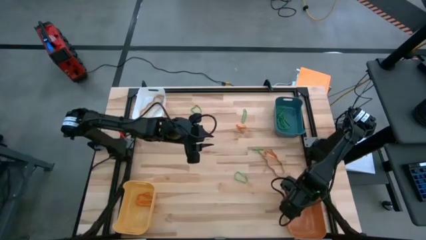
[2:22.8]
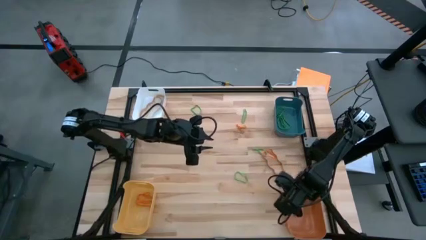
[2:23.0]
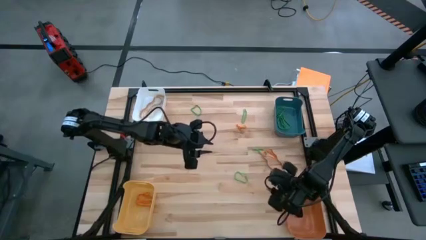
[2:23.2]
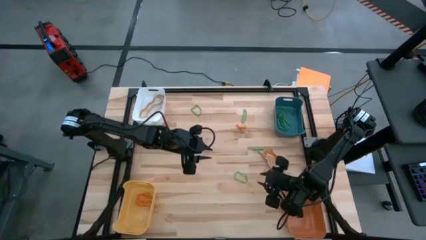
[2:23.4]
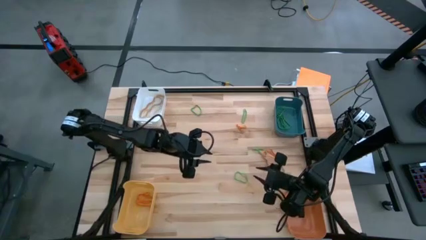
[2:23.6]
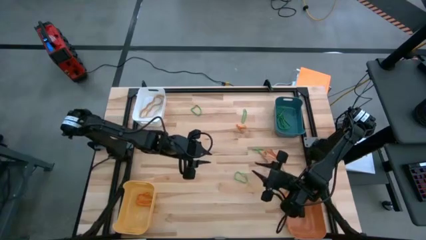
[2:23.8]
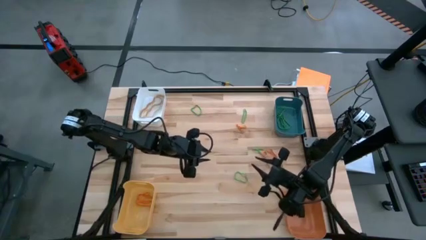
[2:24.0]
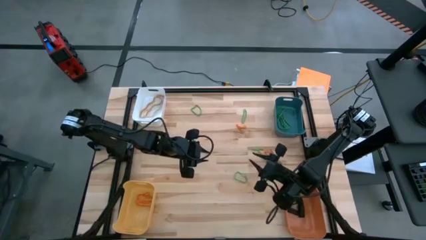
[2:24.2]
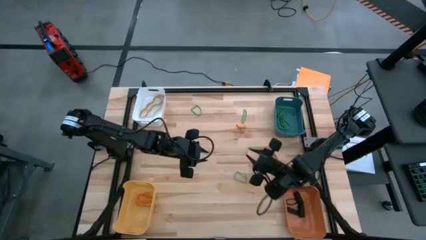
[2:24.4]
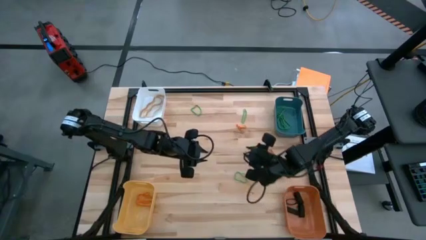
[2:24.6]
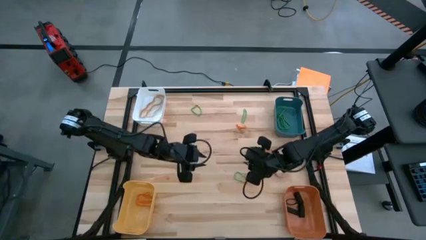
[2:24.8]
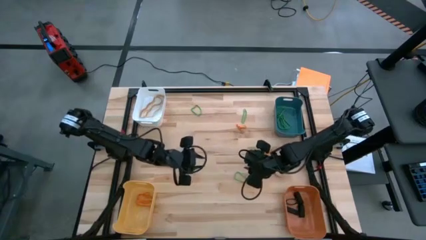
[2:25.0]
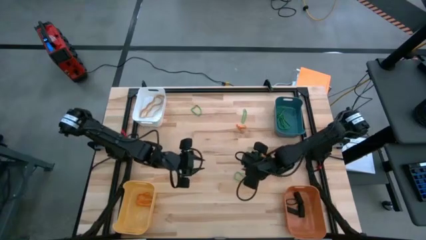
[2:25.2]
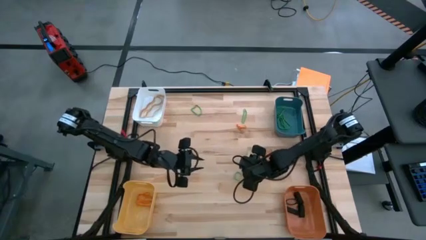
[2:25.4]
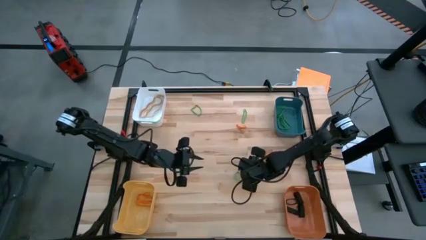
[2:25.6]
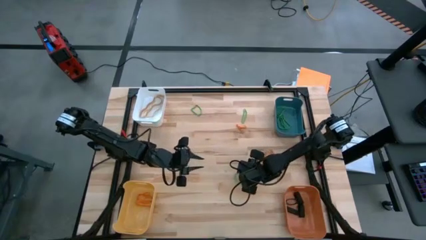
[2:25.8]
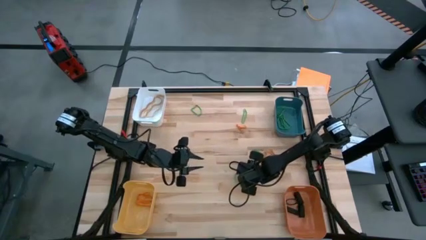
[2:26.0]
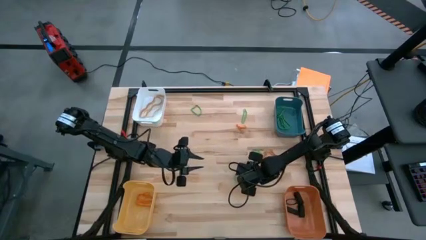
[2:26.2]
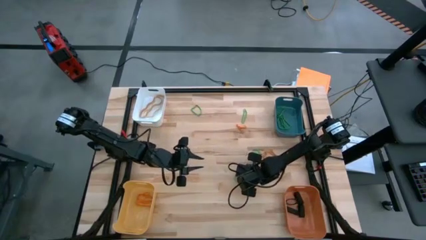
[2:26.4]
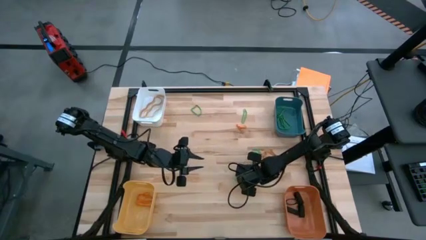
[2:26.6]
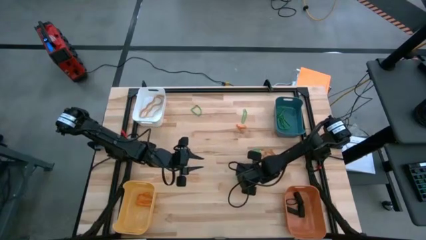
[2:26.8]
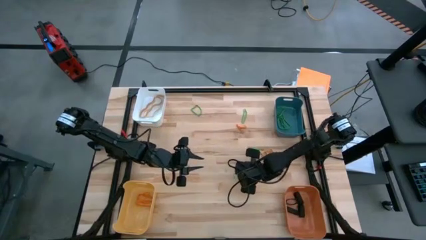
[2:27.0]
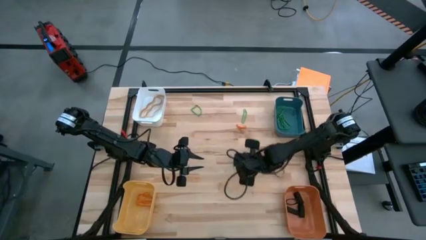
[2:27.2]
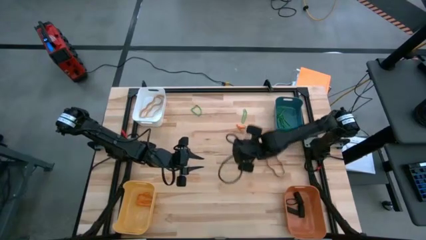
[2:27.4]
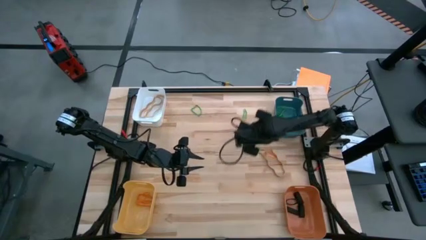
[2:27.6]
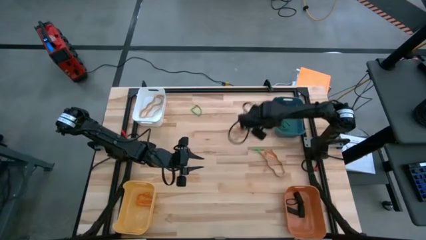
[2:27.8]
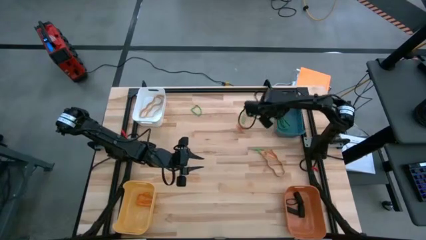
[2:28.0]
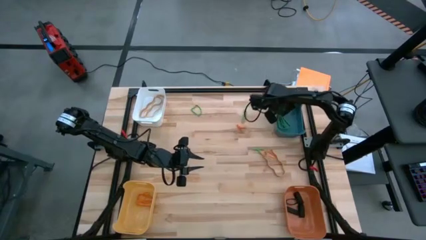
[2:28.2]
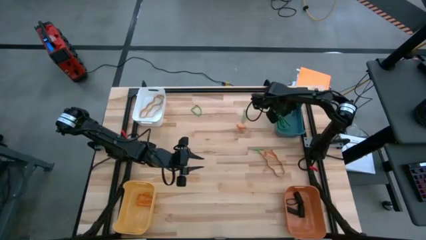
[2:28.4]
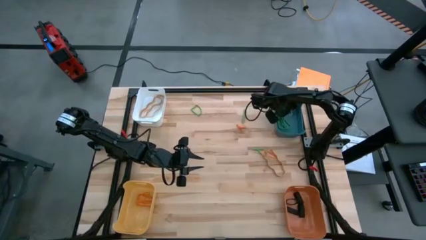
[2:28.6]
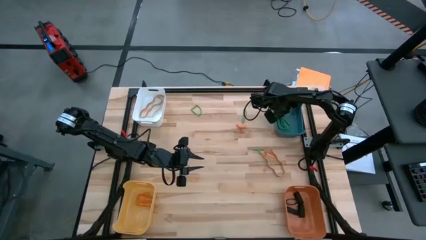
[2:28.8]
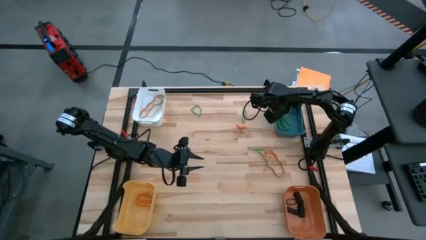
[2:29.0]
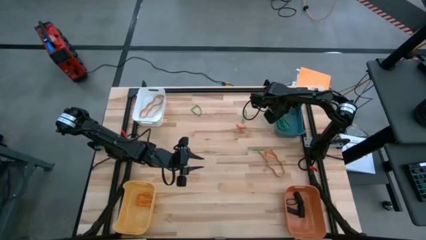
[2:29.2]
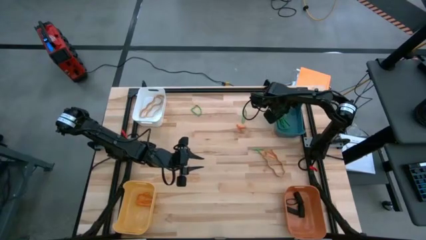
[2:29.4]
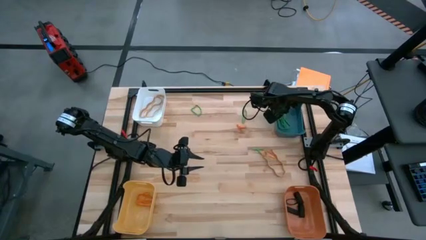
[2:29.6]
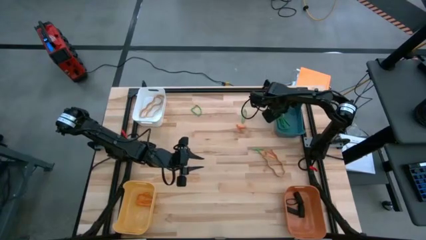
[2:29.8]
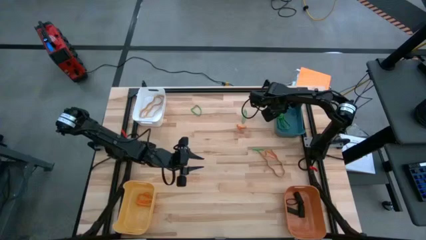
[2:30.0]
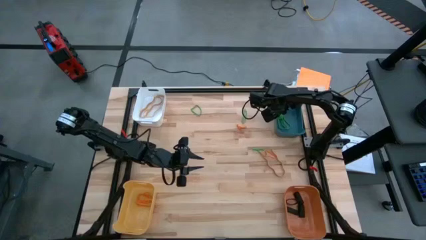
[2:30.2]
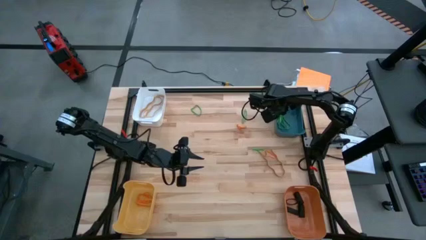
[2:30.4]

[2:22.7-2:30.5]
Task: Sort rubber bands into baskets
Put the green rubber band into the blue bin

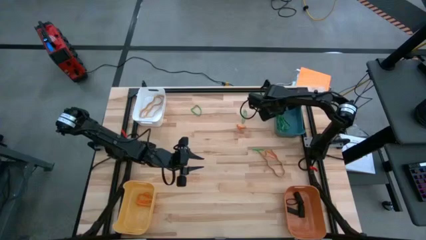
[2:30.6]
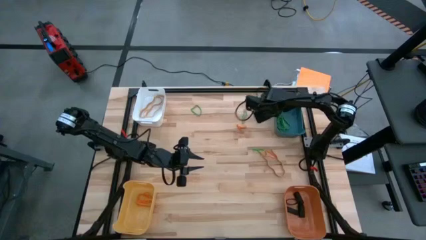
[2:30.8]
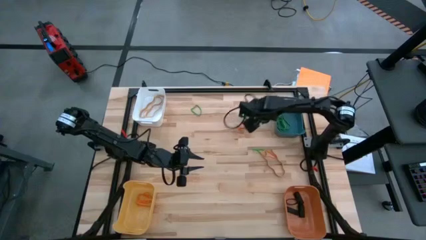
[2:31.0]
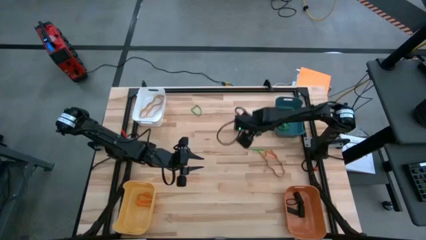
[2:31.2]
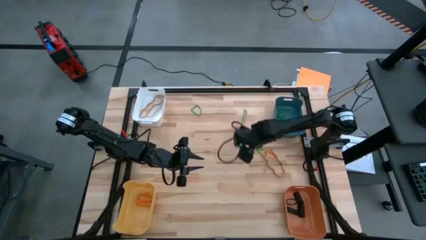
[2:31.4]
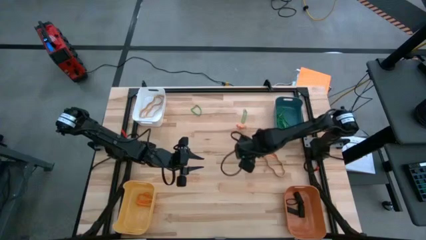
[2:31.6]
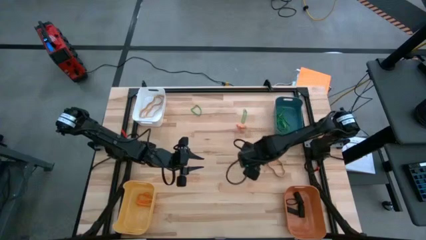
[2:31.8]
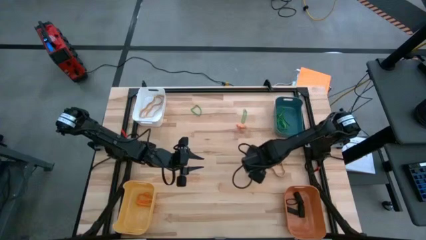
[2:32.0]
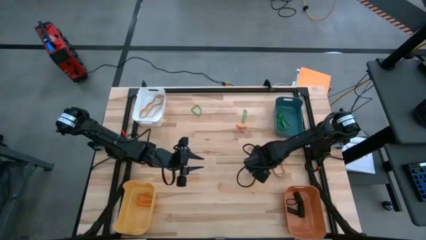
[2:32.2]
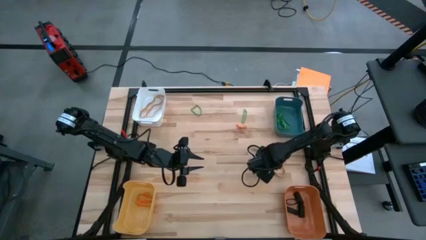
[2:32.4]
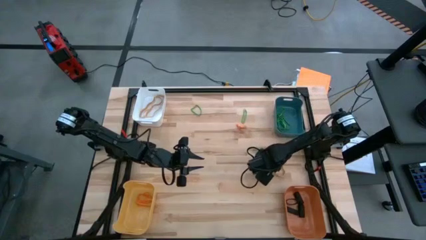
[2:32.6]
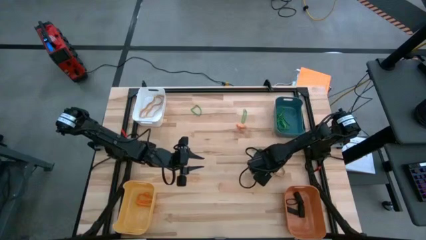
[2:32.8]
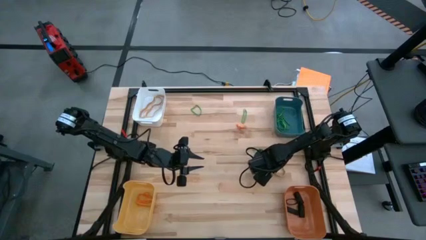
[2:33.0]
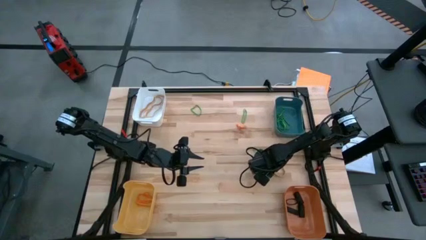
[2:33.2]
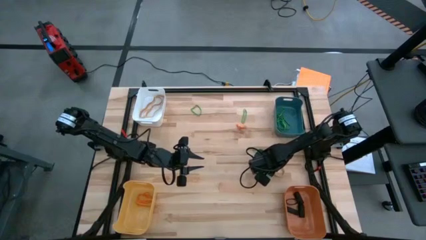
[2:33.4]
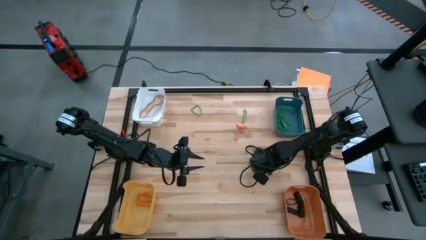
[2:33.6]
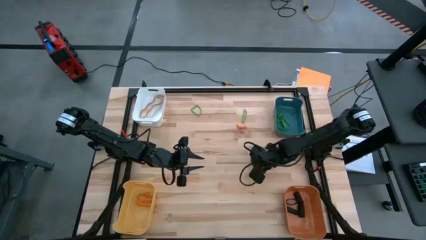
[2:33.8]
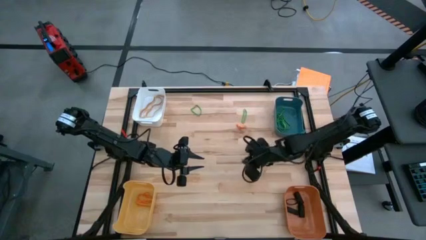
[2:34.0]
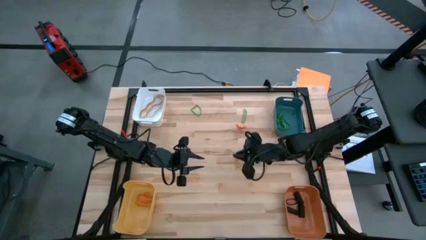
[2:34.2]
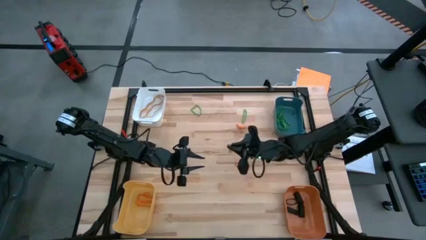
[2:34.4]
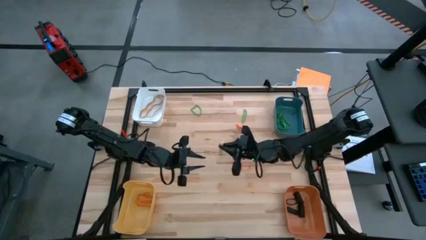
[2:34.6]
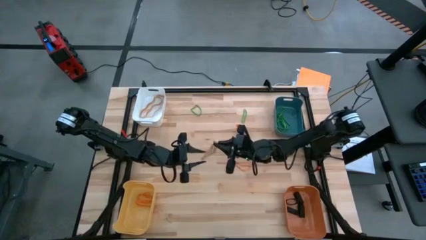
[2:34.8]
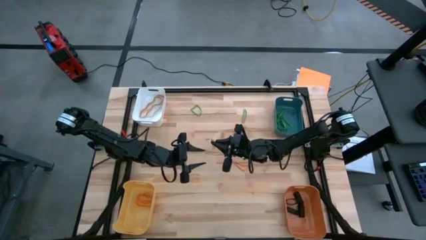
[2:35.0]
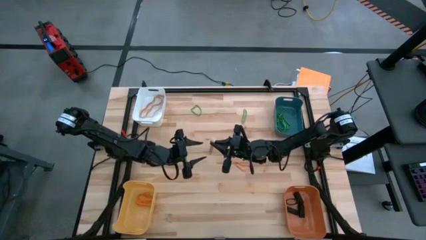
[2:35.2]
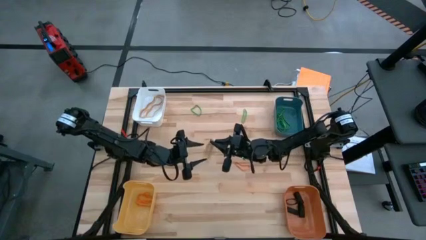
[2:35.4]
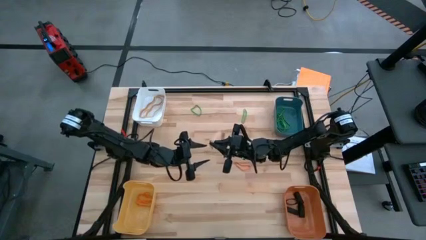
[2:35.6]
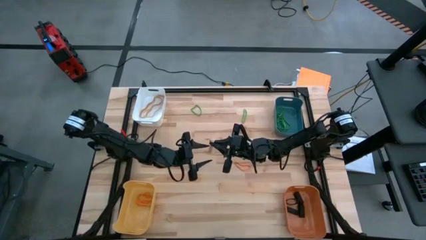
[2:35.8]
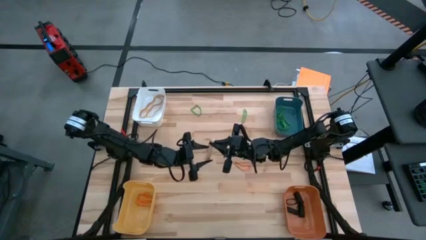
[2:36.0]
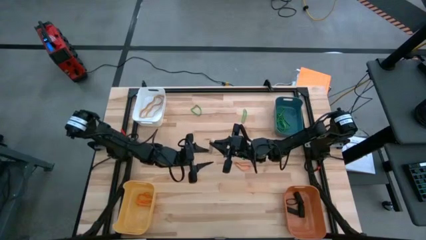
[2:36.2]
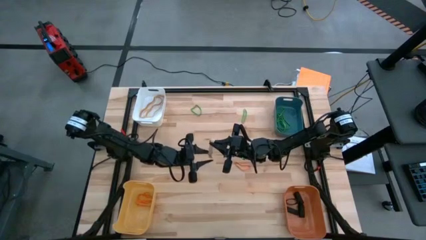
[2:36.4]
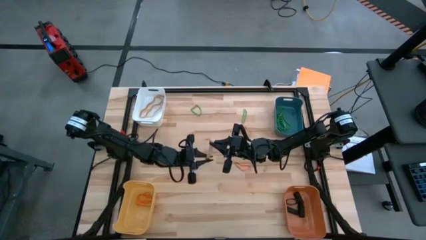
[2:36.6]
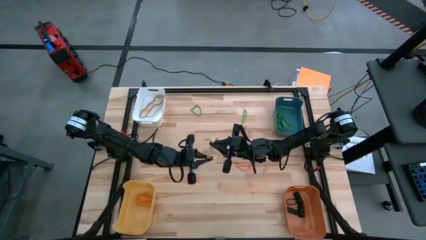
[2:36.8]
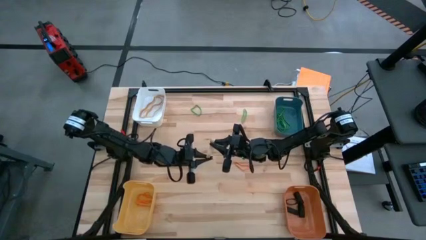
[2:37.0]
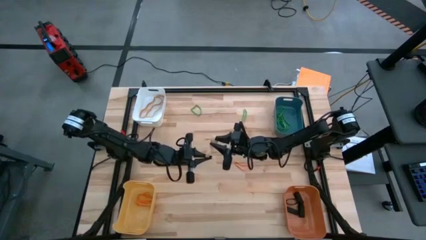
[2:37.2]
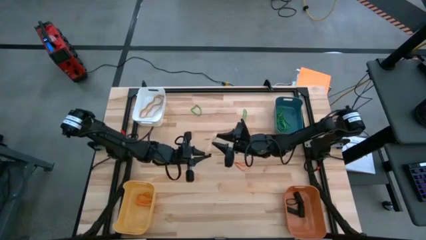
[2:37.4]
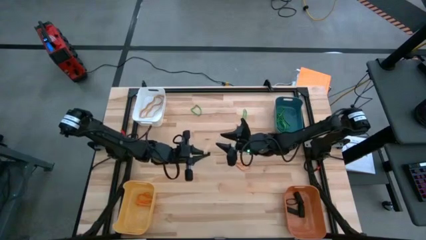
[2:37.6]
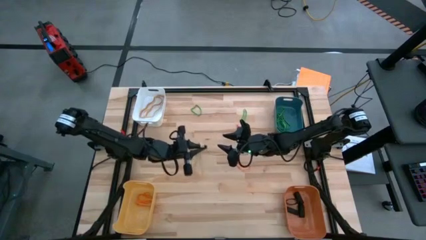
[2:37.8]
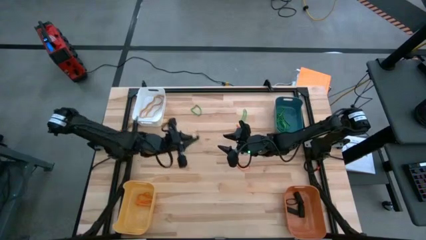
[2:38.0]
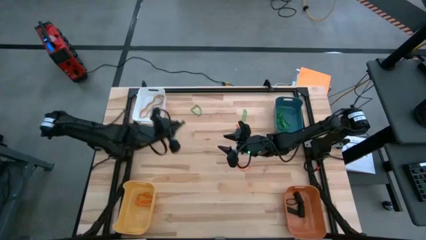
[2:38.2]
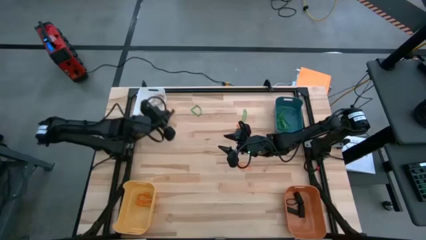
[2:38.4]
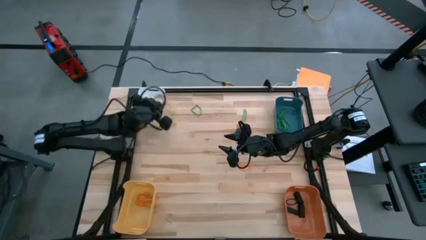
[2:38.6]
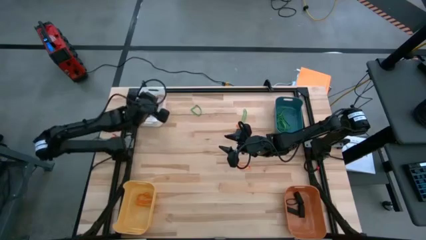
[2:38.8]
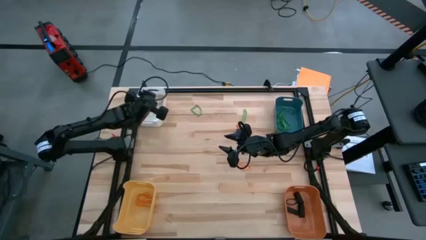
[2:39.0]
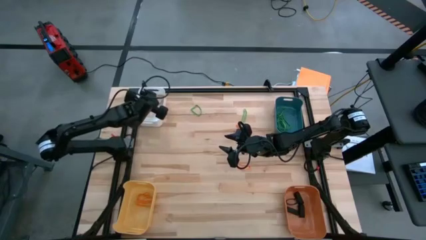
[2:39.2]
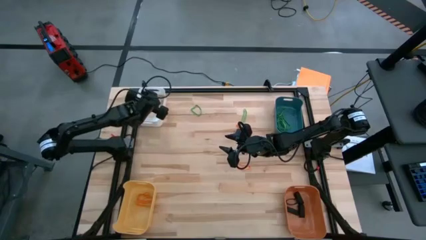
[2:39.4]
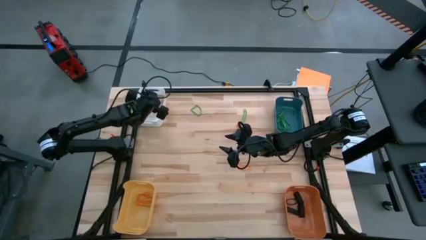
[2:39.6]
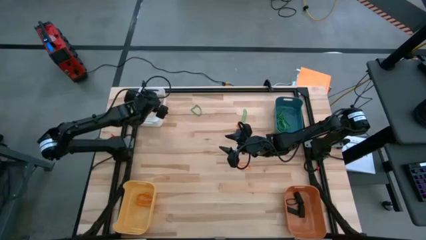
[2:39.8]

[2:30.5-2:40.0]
Put the brown rubber band into the white bin
